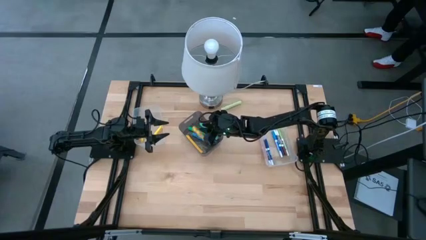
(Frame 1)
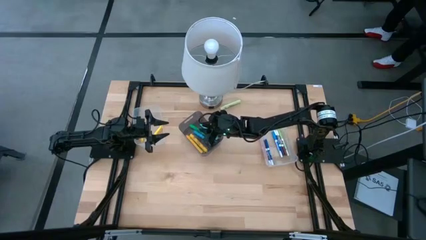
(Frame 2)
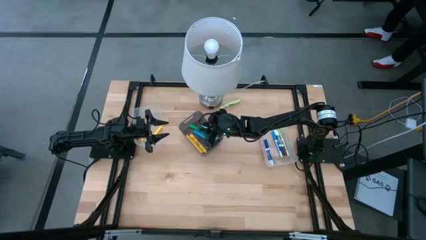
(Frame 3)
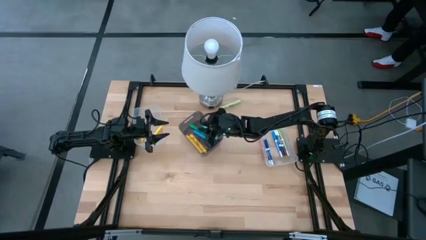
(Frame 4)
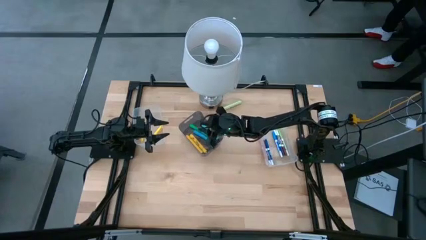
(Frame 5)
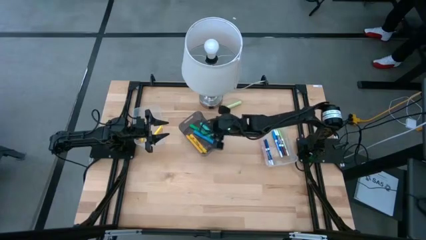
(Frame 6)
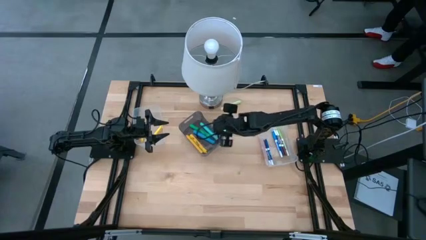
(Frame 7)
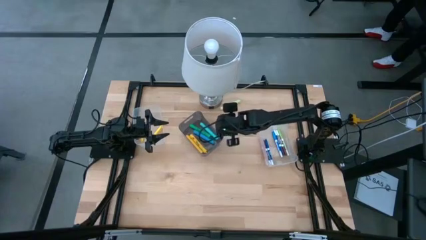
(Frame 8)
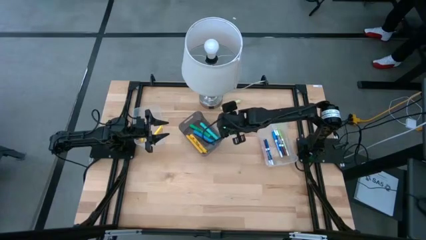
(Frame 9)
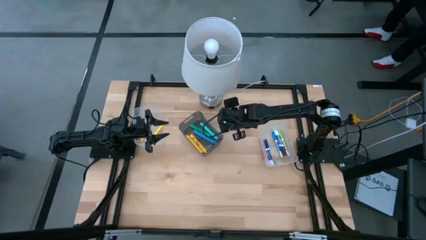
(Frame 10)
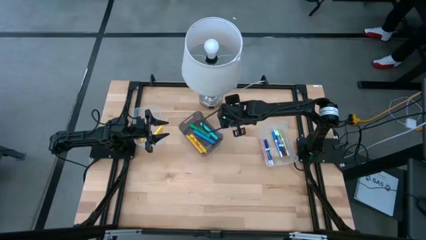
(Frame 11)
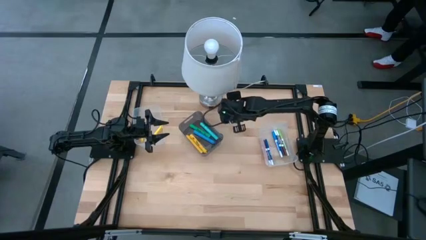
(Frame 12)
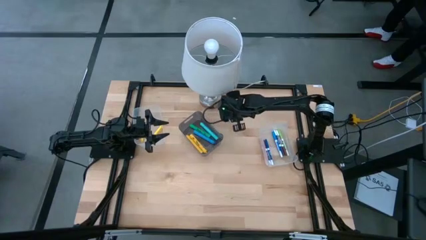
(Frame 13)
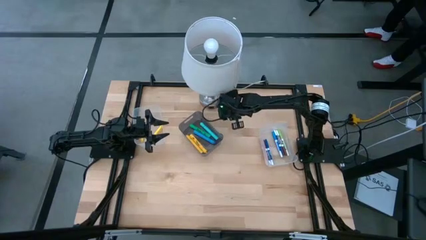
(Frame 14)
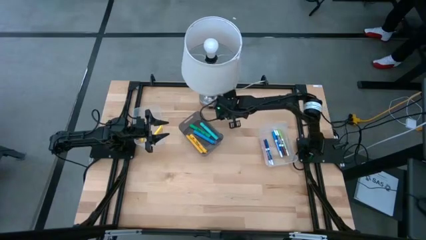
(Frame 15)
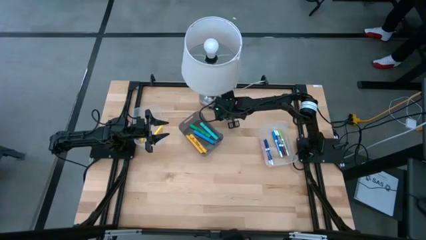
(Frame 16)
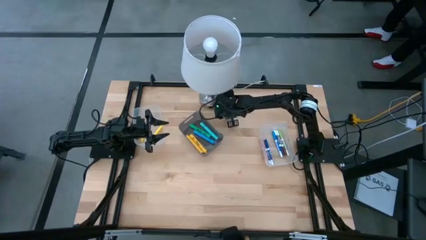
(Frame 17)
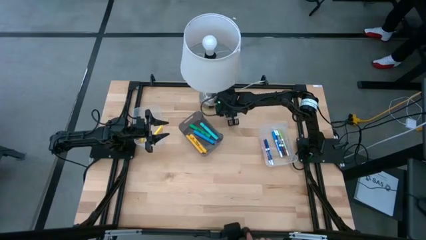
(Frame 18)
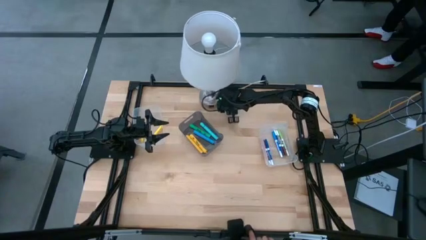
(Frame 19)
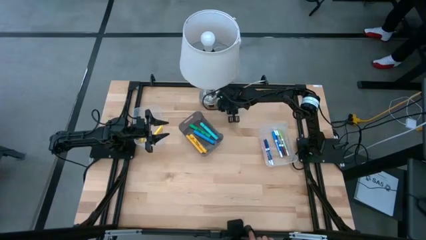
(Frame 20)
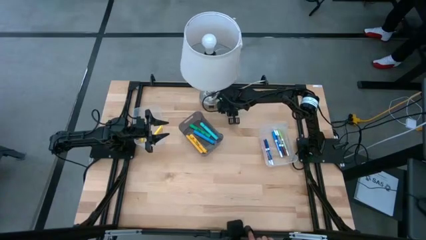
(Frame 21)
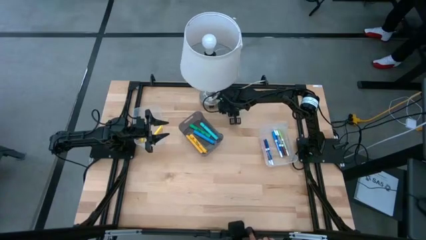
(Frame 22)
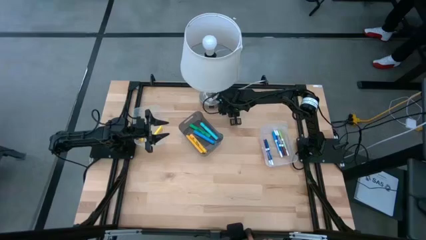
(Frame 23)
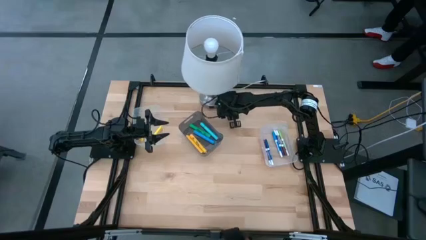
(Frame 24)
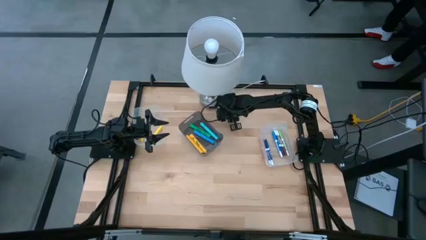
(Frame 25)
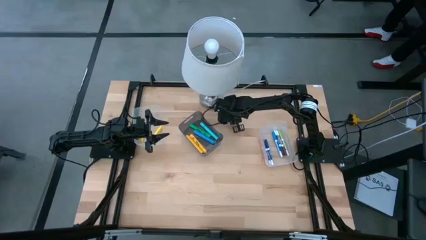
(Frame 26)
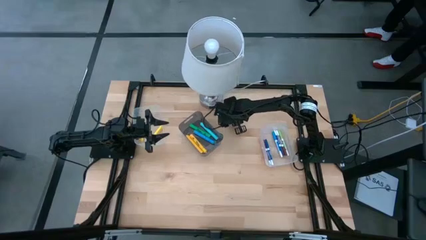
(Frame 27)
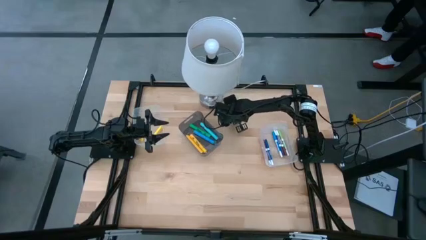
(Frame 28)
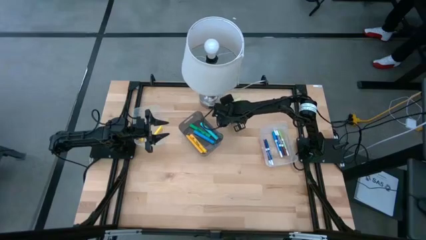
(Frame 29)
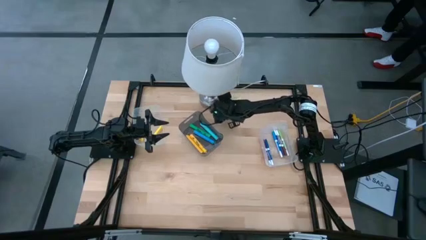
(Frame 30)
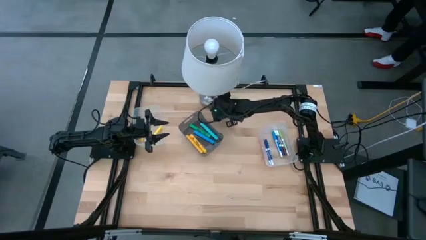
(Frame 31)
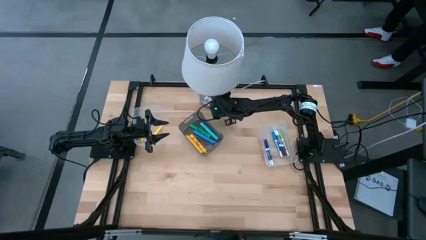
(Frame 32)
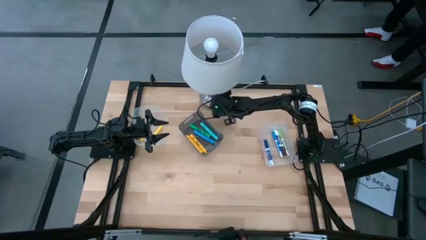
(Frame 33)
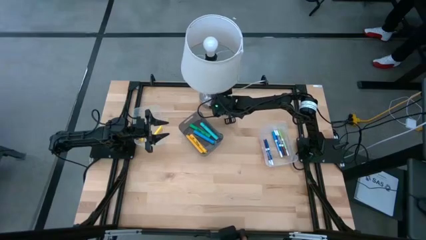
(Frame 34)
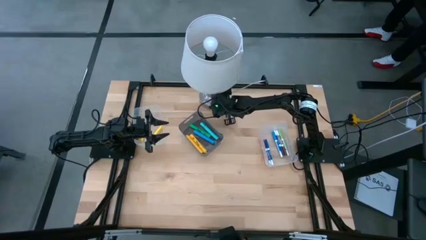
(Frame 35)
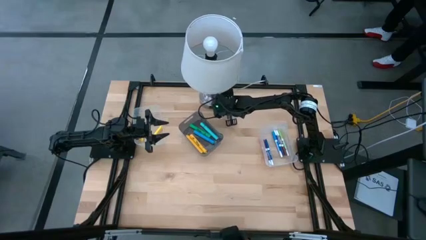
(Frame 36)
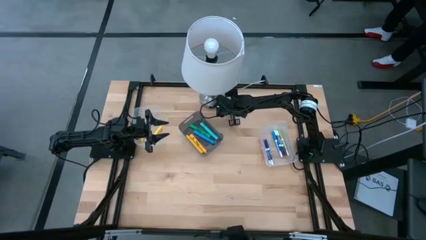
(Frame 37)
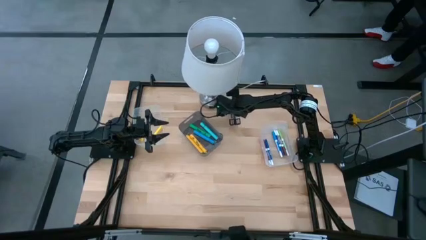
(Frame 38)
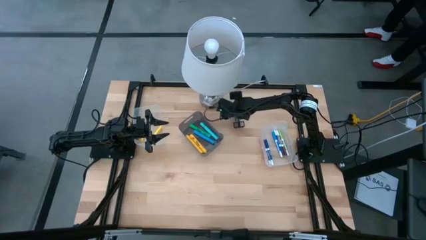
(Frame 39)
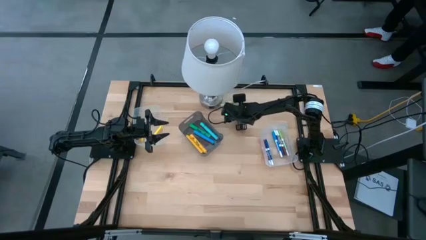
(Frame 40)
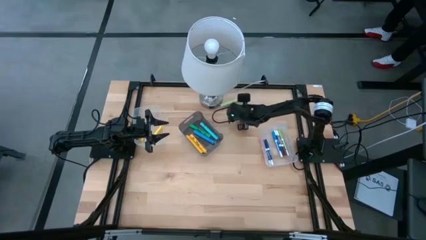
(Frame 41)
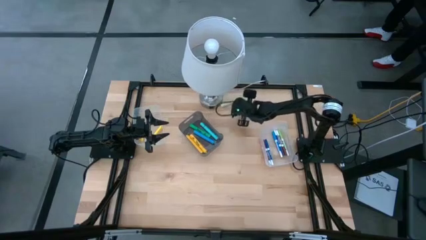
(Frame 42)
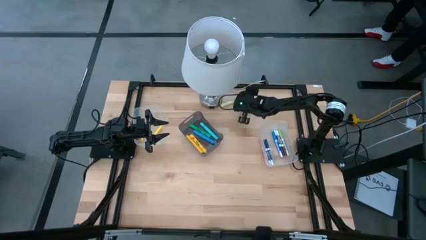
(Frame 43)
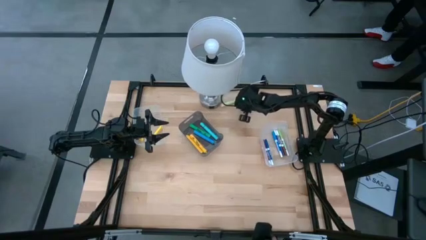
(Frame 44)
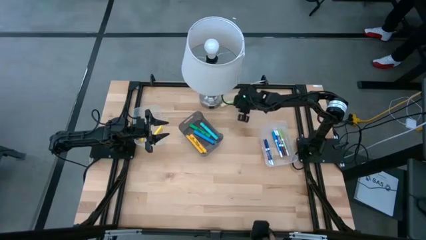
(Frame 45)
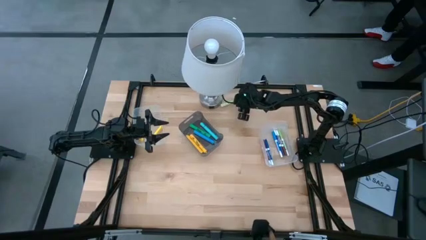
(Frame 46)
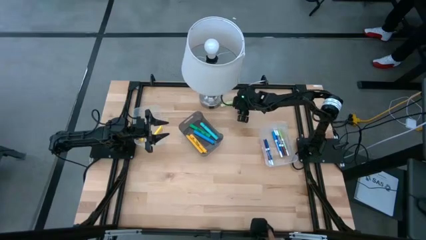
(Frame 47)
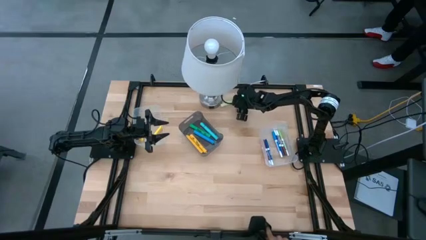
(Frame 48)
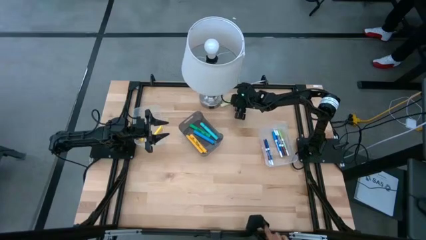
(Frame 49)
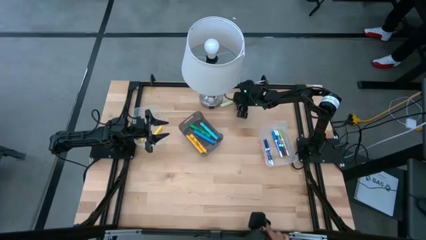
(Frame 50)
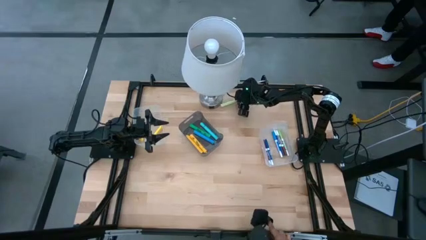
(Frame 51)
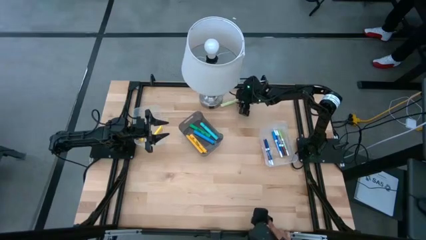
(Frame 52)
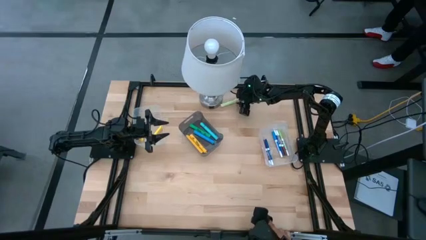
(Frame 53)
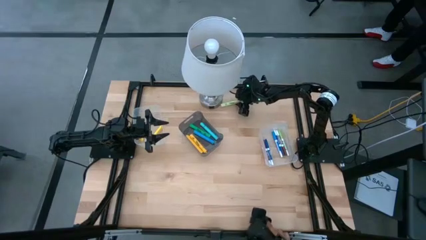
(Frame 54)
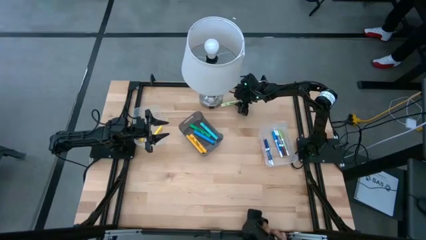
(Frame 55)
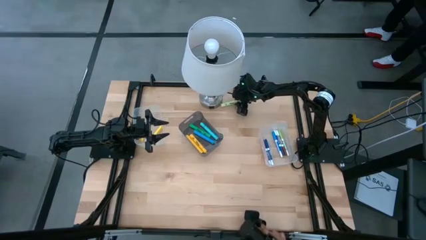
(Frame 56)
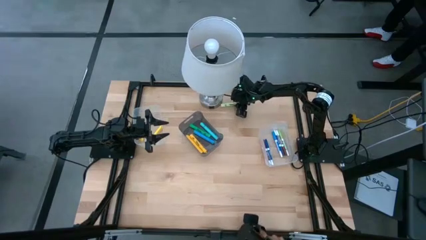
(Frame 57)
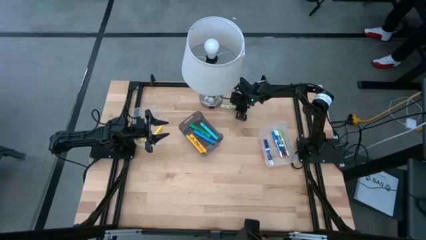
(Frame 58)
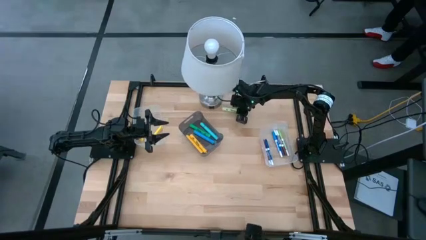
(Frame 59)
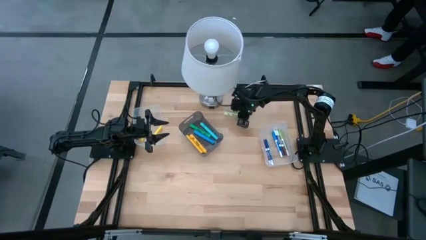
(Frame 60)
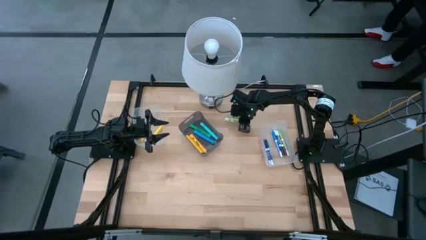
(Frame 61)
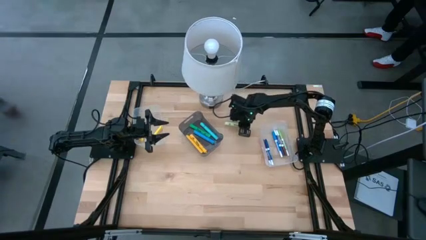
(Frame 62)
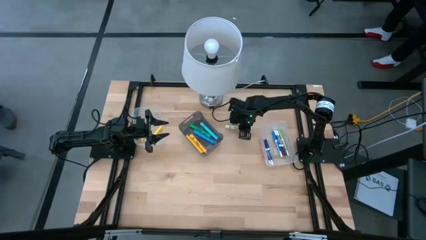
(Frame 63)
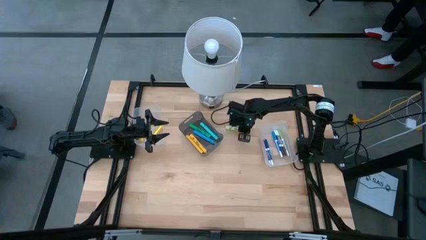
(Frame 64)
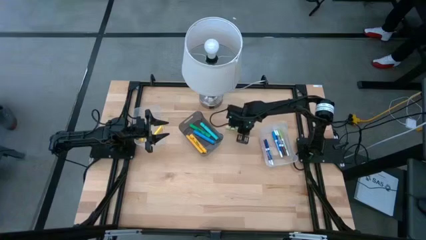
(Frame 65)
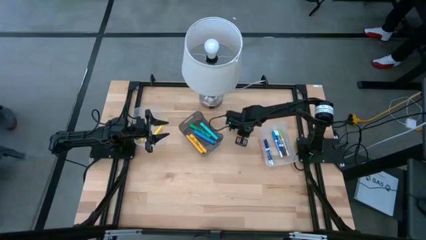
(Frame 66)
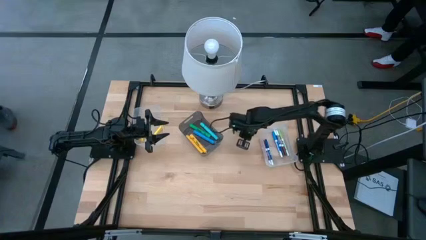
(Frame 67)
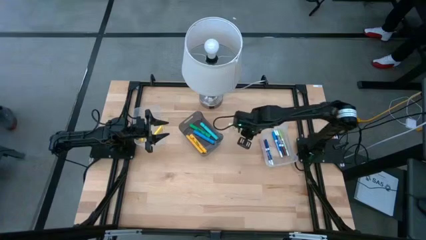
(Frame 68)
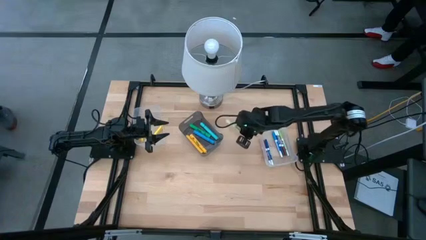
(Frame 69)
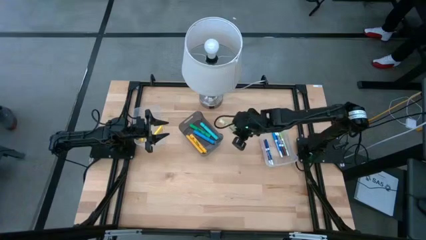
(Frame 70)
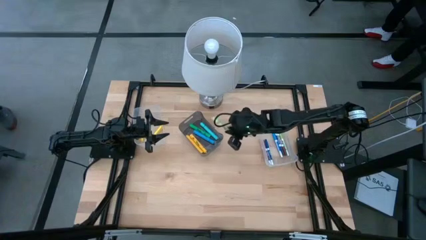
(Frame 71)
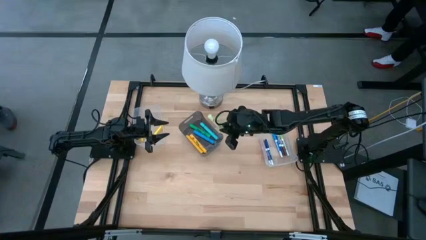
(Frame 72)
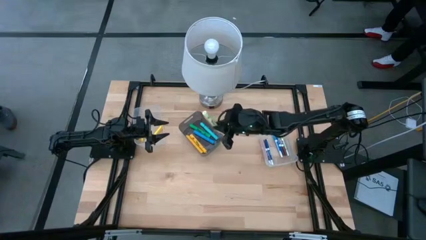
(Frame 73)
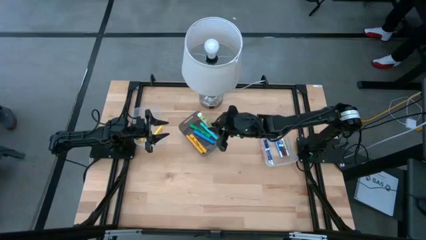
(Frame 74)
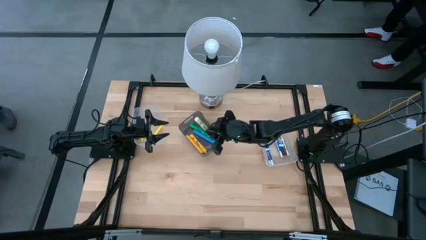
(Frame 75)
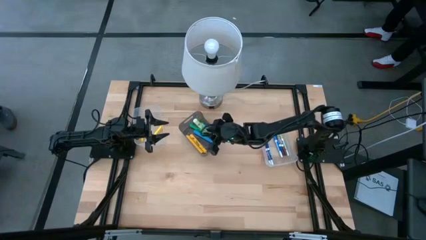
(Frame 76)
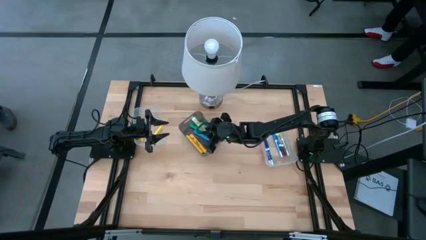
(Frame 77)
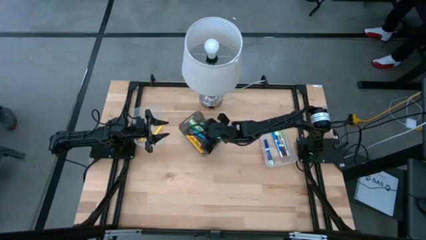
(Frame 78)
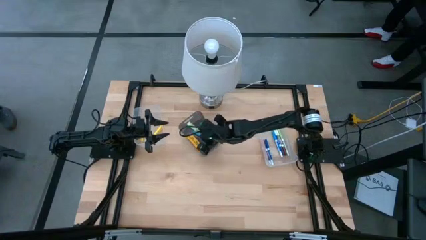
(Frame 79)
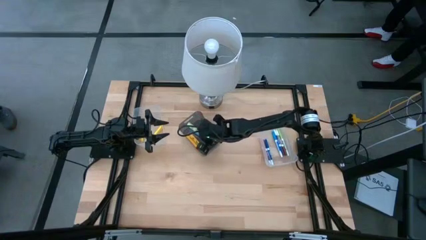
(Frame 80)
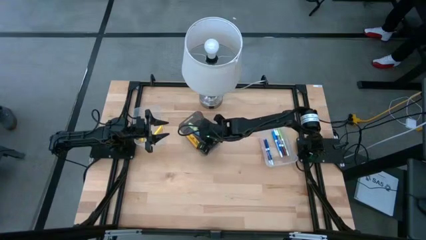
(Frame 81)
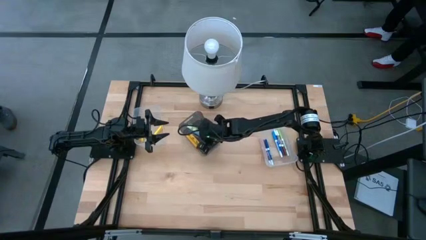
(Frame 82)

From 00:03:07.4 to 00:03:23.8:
Task: Pick & Place Markers
Put the light green marker into the black bin
